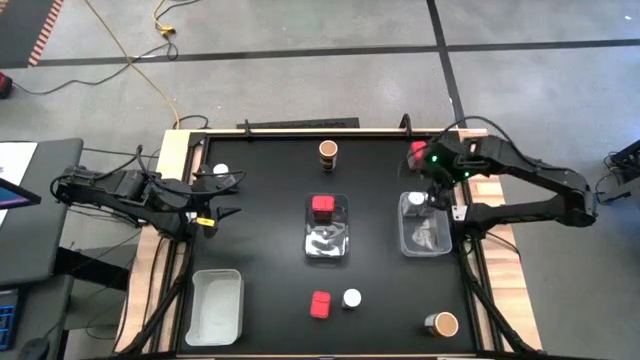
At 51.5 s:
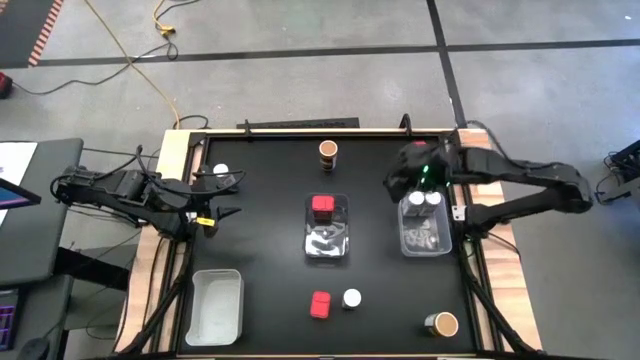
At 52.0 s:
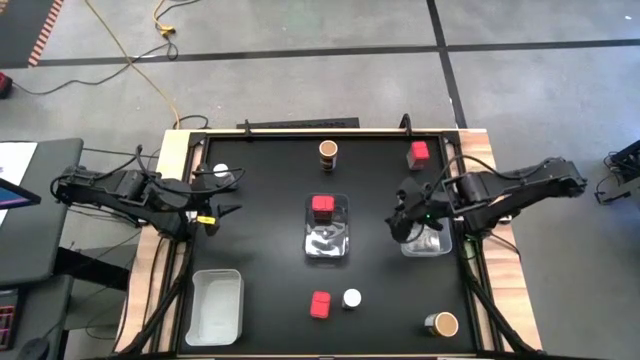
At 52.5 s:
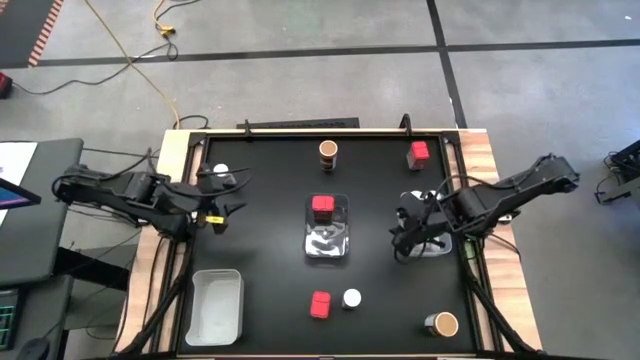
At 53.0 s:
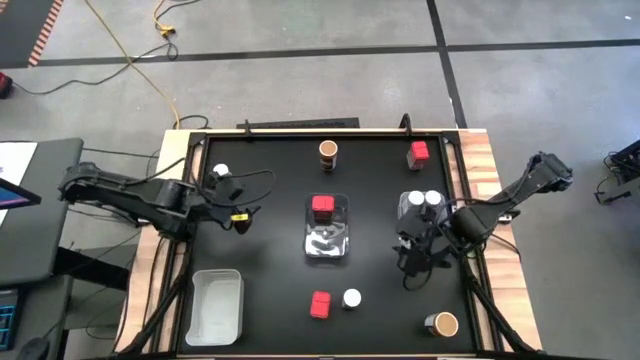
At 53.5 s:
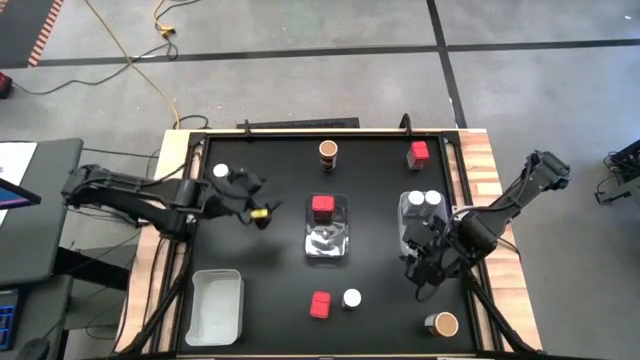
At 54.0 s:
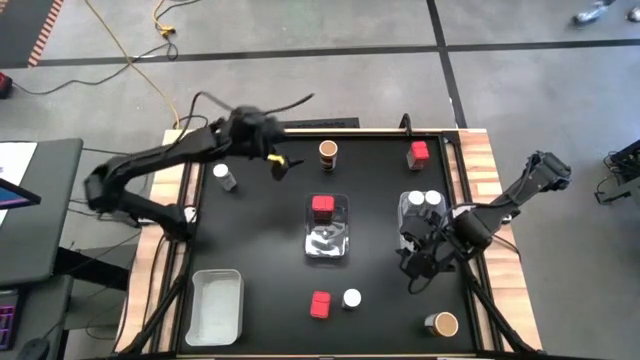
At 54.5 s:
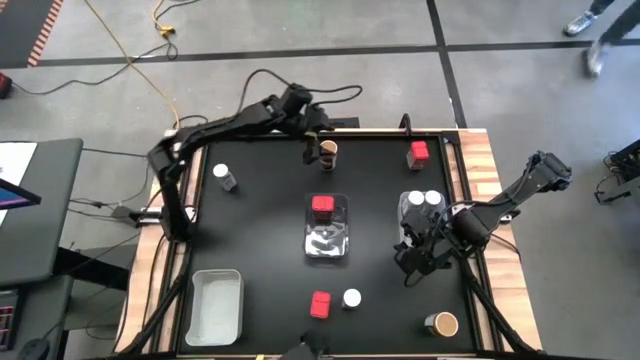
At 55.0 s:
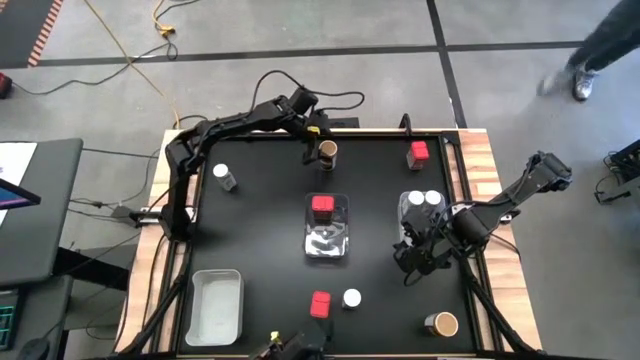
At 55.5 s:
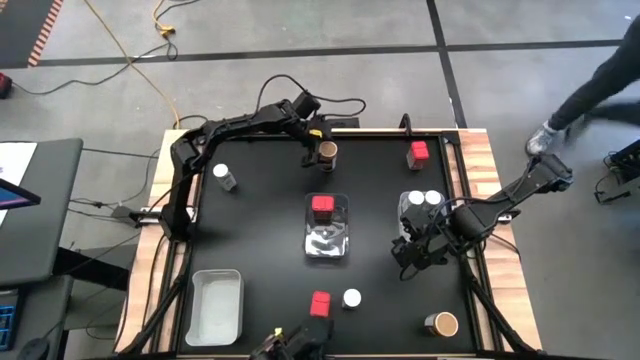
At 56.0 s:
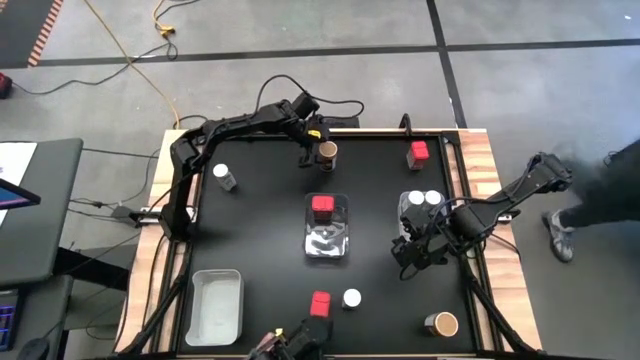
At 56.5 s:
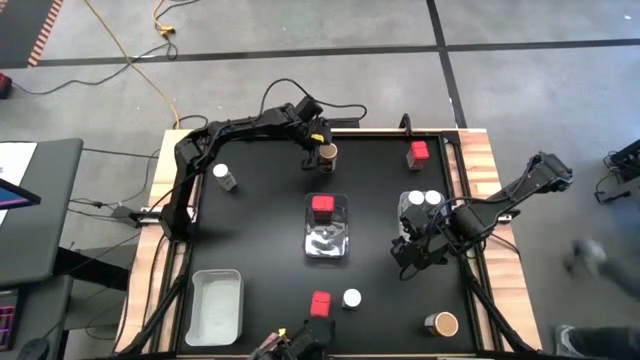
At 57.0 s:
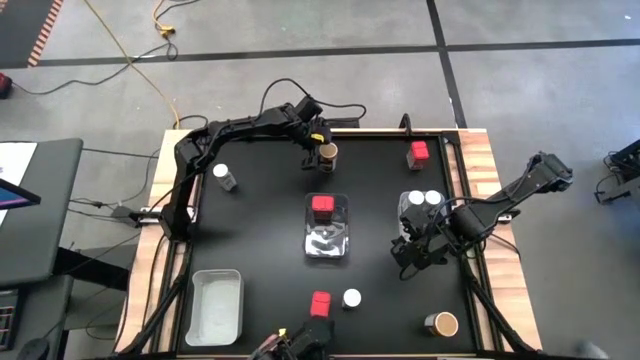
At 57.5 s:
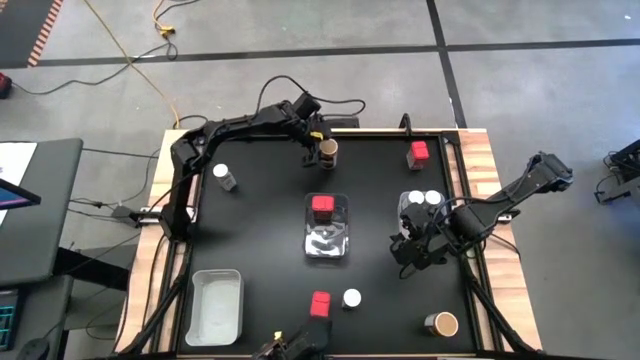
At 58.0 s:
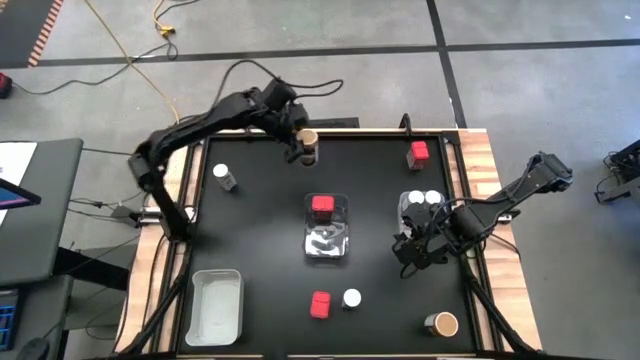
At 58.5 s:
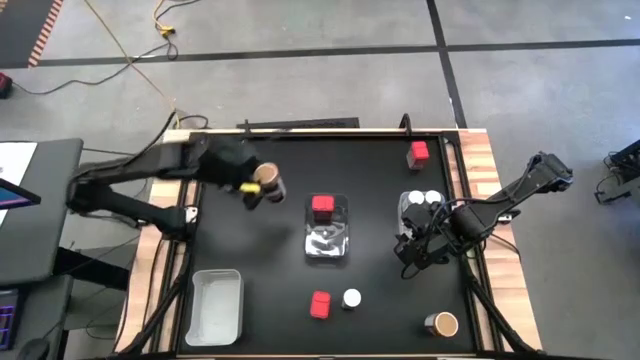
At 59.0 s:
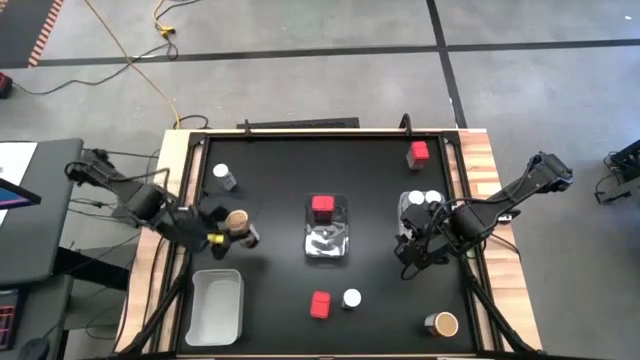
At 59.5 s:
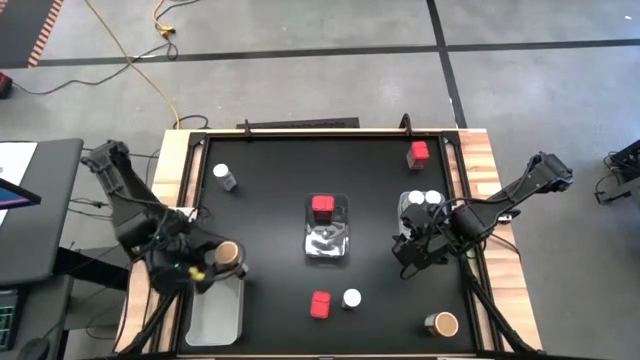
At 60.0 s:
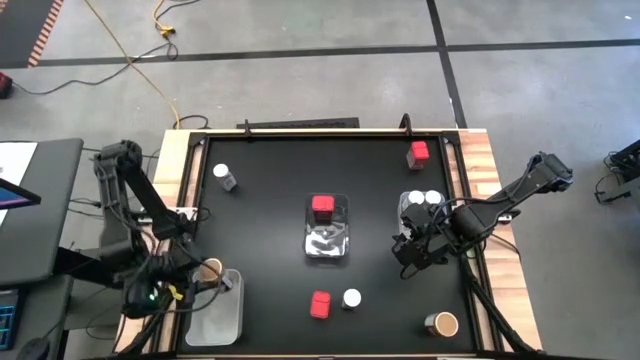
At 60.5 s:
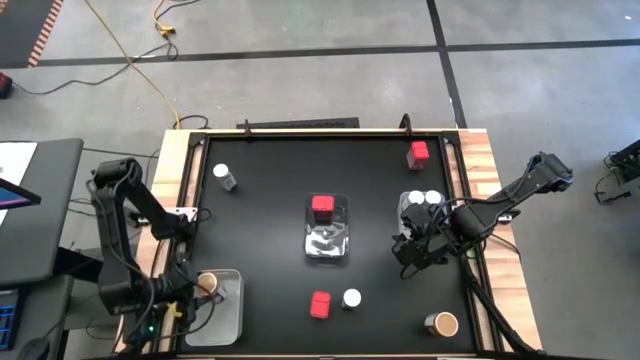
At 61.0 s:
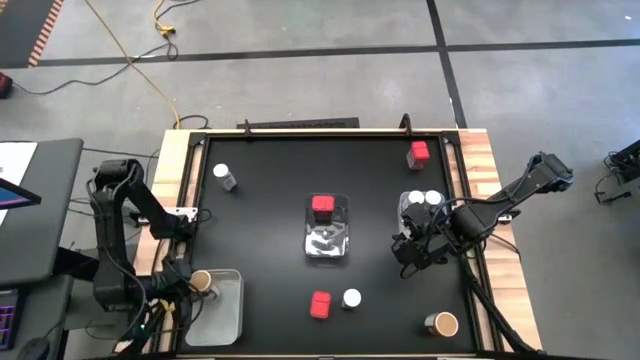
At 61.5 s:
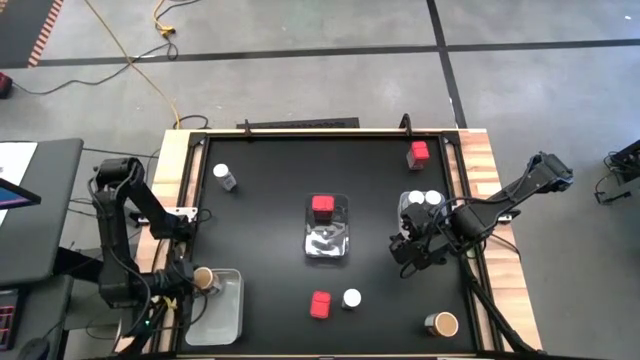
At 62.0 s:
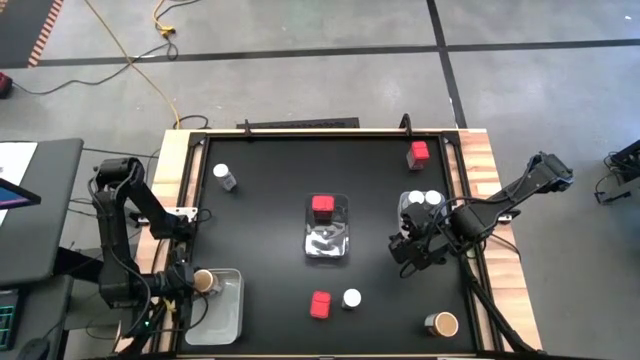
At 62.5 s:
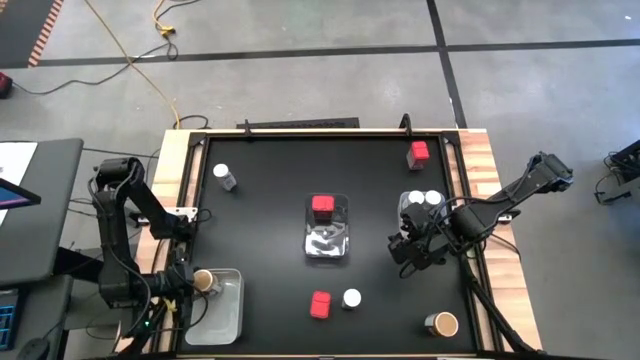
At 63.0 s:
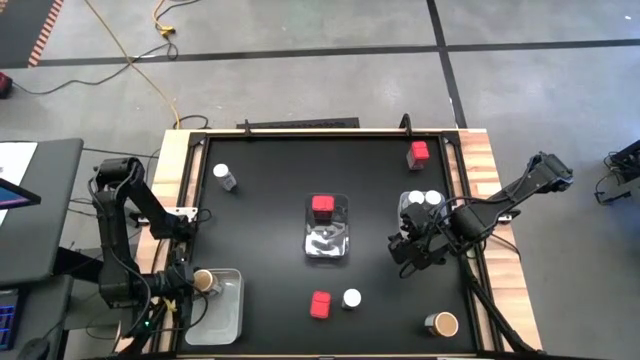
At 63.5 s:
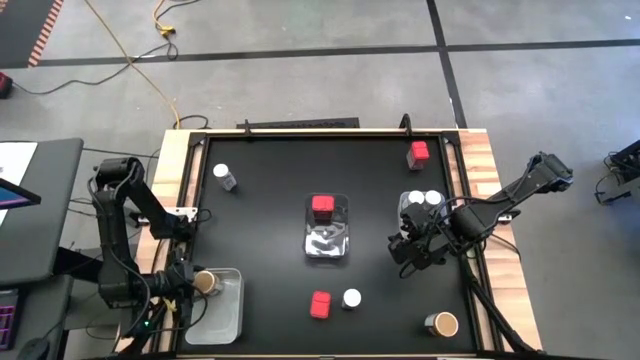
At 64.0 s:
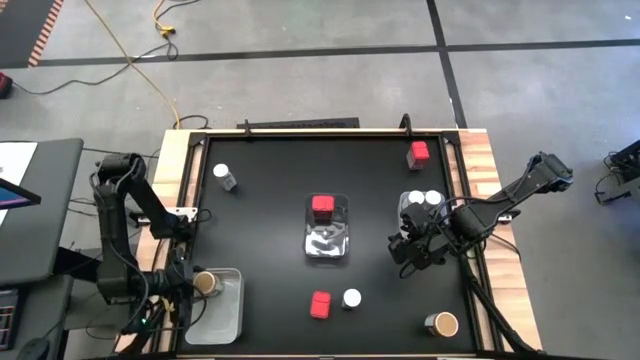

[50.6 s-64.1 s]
Task: Sort spices by type
Put the brown seasoning bottle into the gray bin

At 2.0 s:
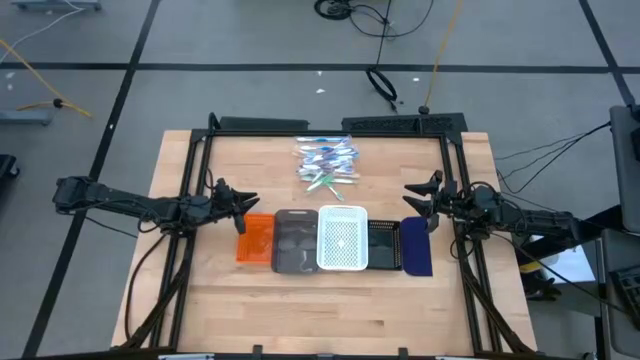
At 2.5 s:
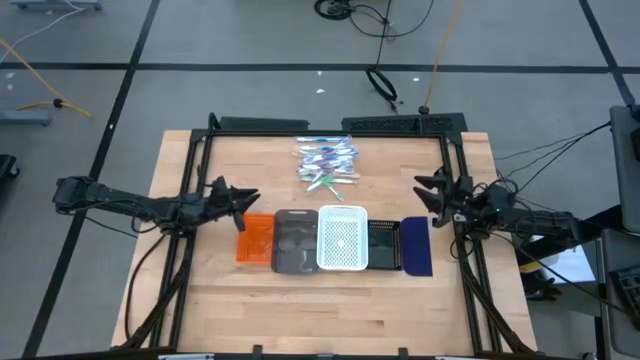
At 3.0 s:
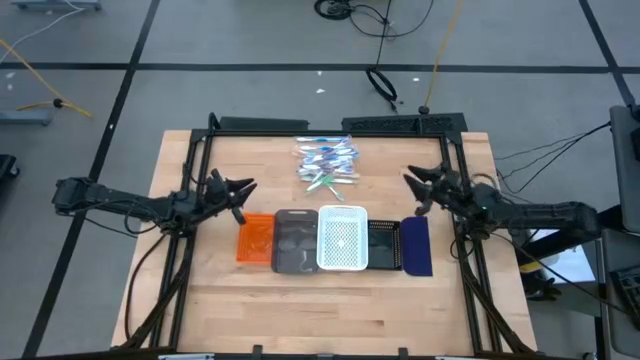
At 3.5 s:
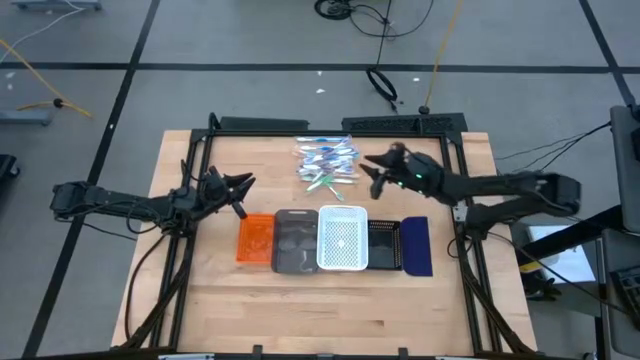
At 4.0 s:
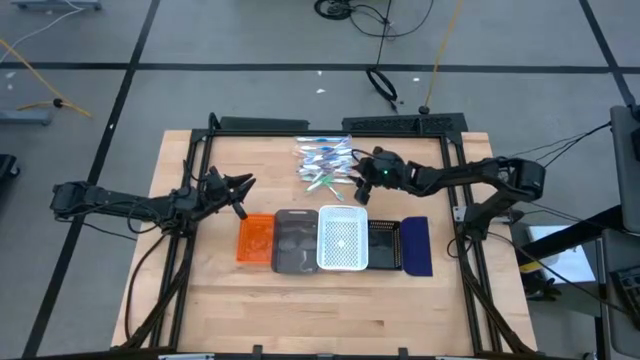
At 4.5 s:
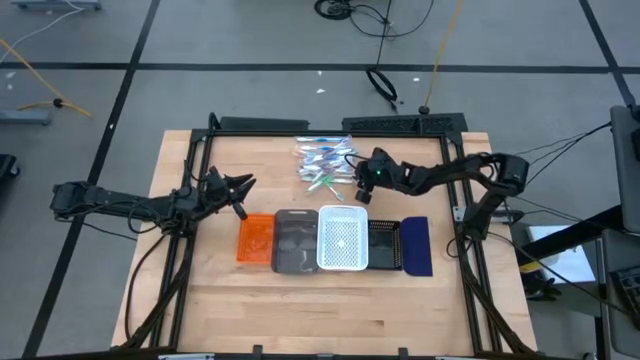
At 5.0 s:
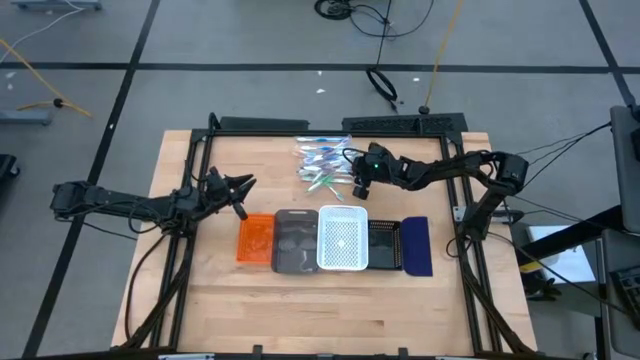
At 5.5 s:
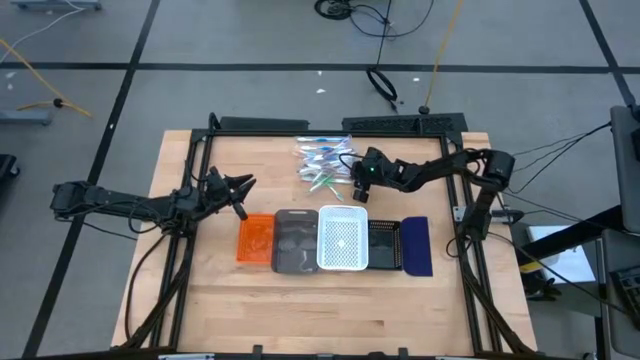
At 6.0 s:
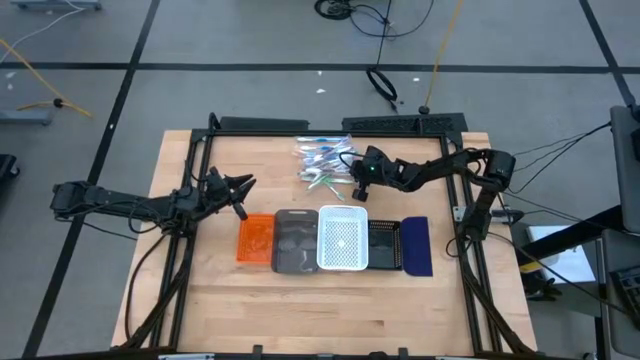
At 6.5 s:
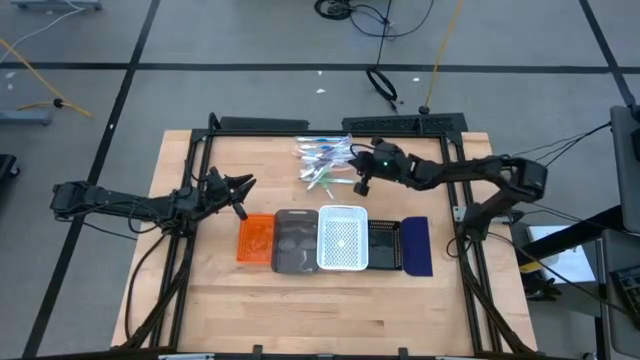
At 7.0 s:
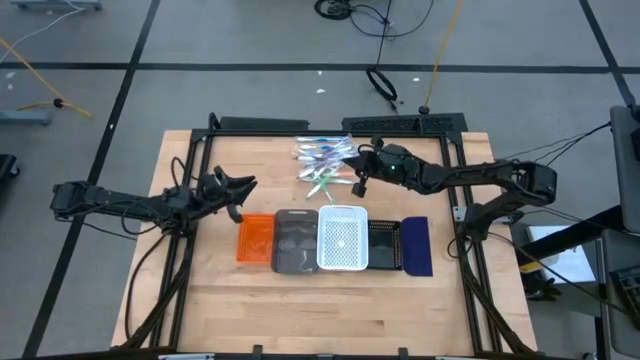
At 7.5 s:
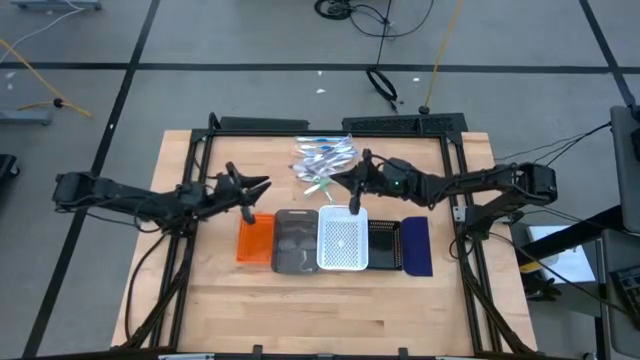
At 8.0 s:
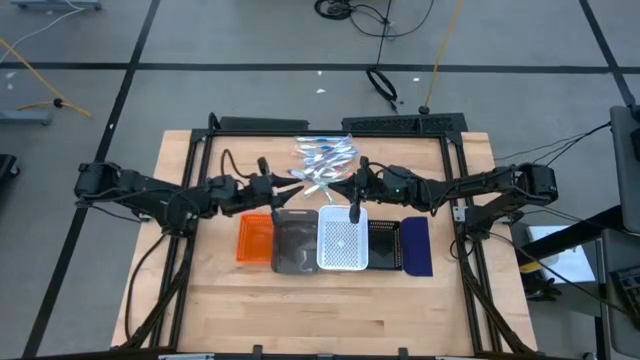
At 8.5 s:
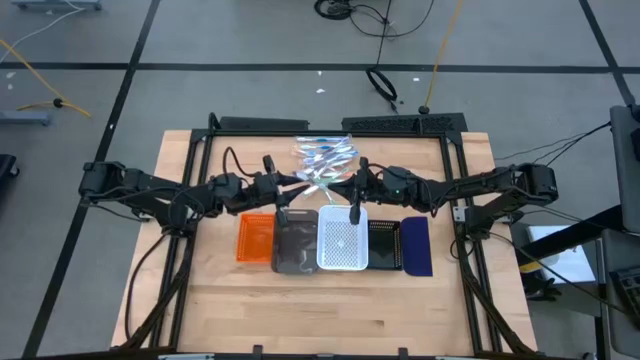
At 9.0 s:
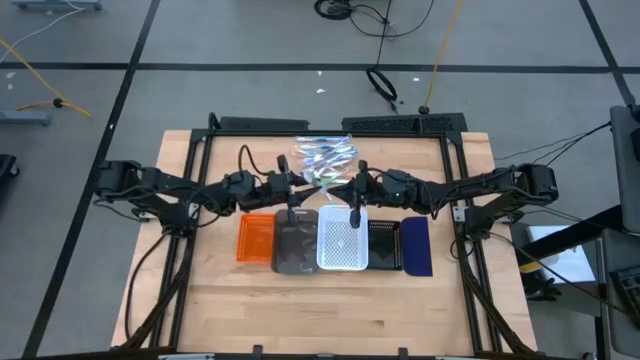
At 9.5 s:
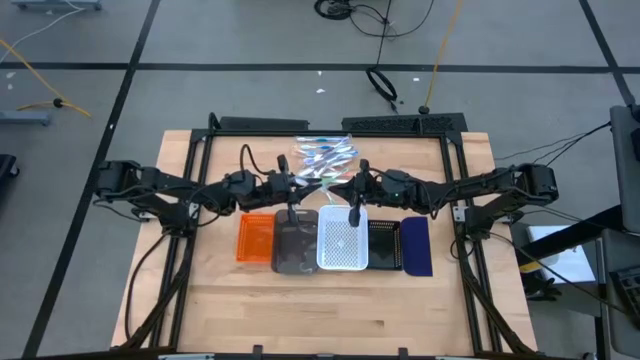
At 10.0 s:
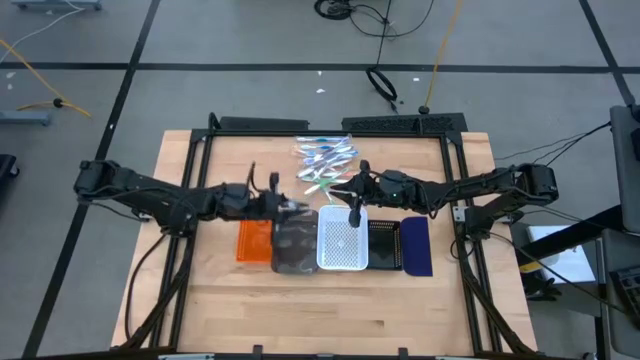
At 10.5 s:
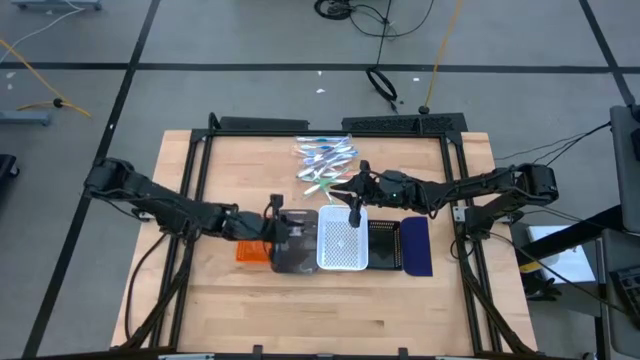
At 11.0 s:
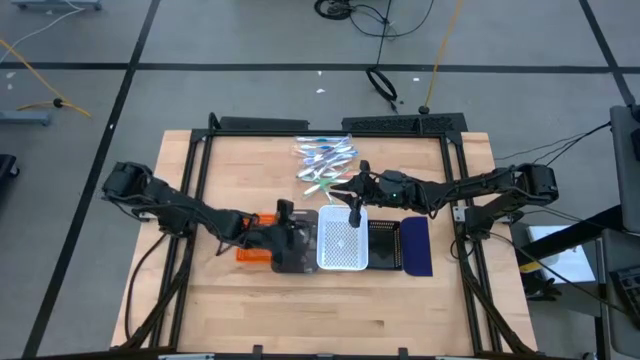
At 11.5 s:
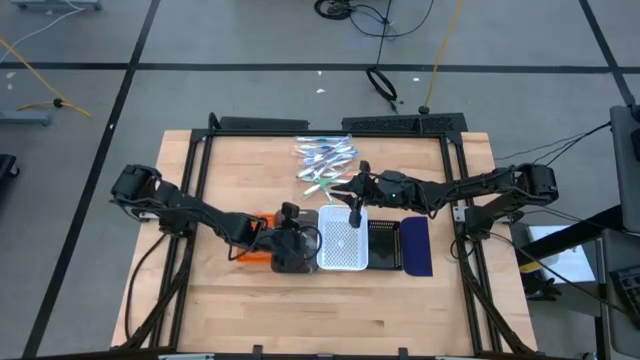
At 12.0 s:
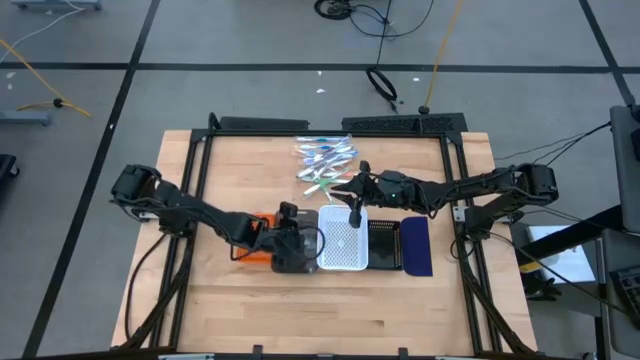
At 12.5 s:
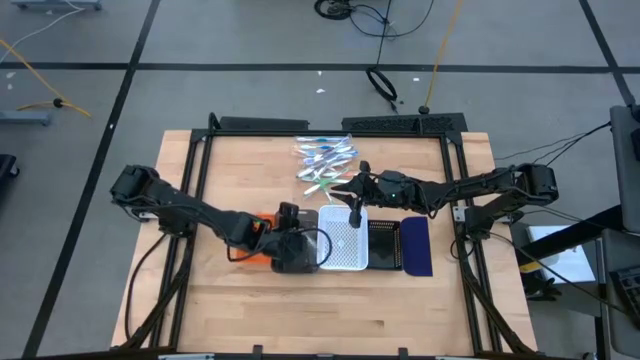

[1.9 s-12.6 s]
Task: Pick & Place Toothbrushes
Put the purple toothbrush into the left black bin
